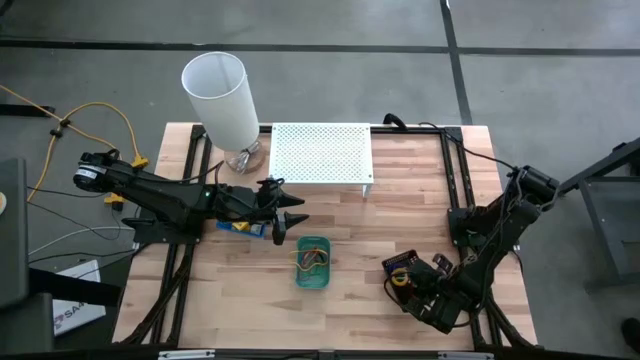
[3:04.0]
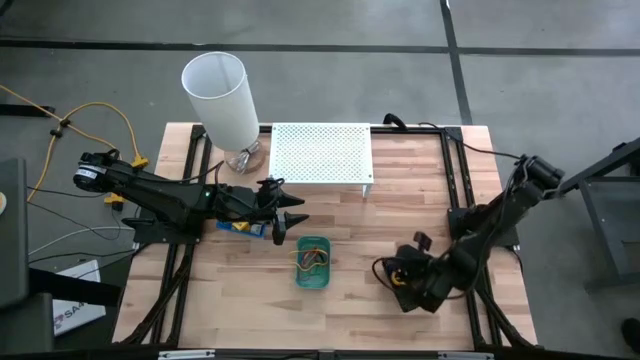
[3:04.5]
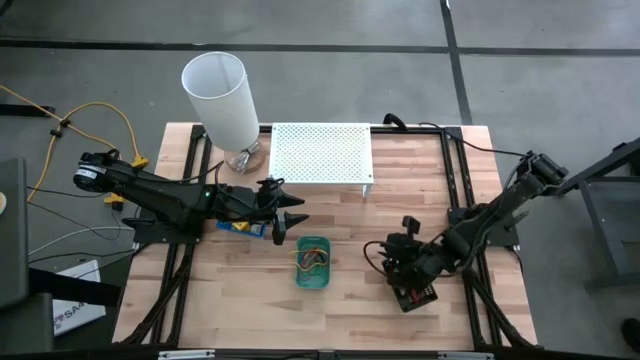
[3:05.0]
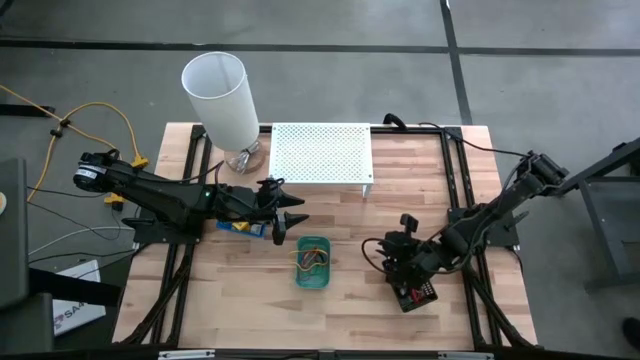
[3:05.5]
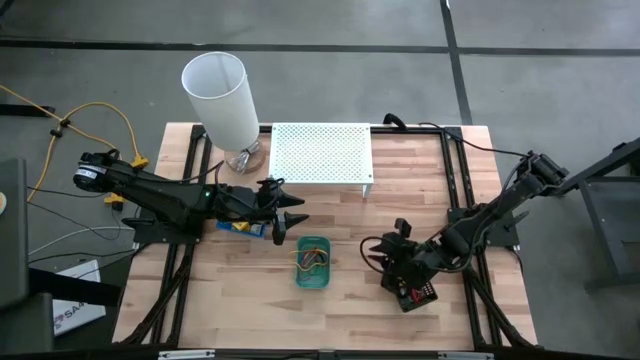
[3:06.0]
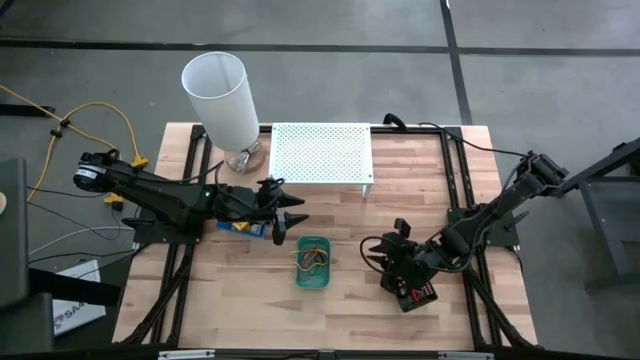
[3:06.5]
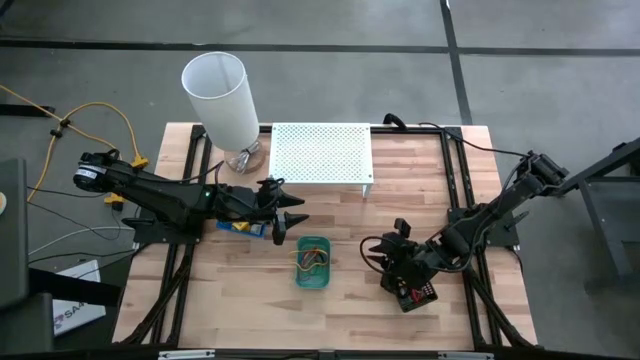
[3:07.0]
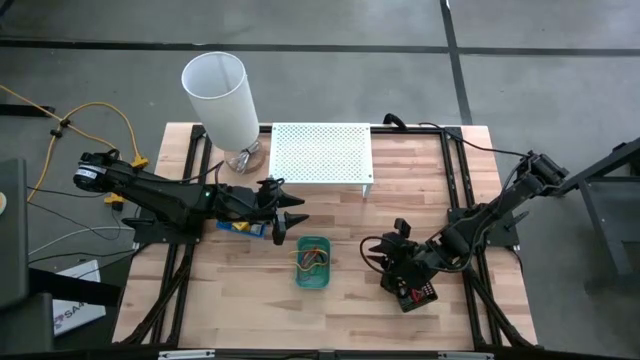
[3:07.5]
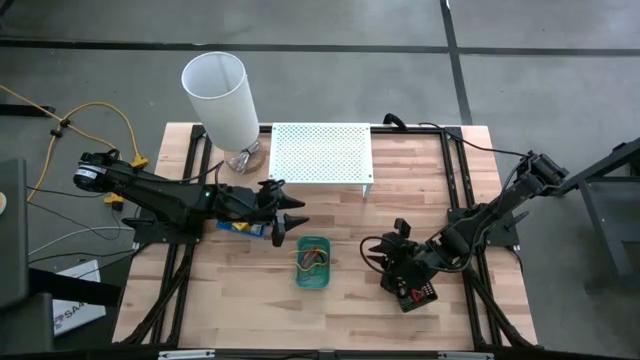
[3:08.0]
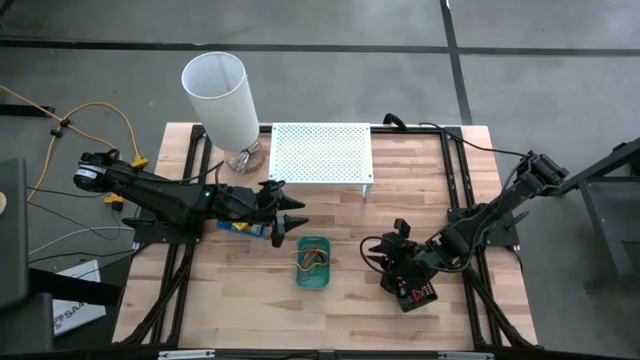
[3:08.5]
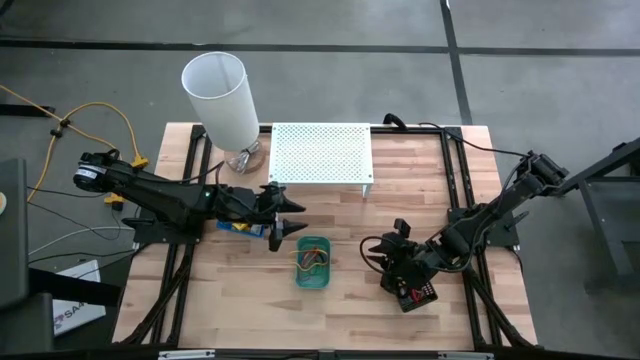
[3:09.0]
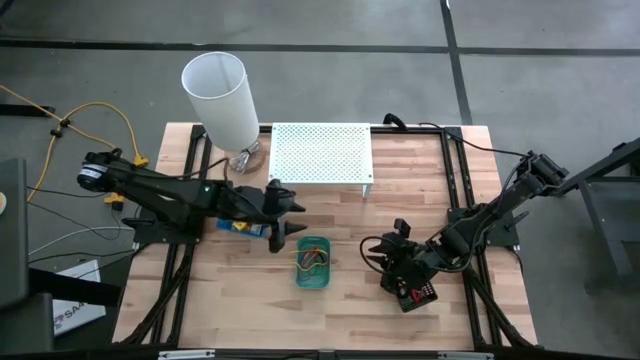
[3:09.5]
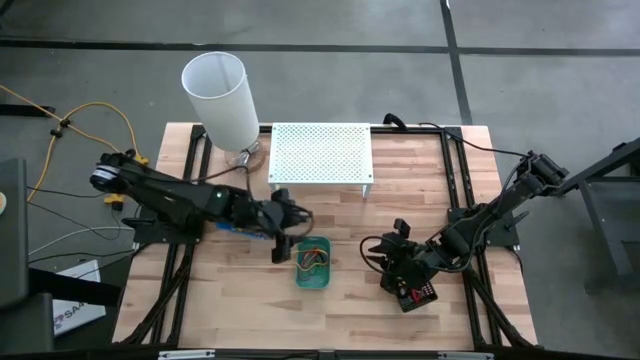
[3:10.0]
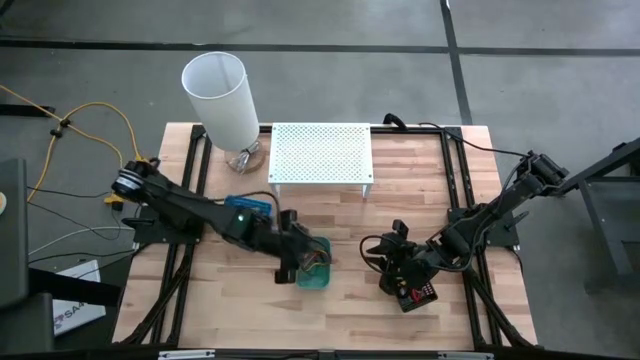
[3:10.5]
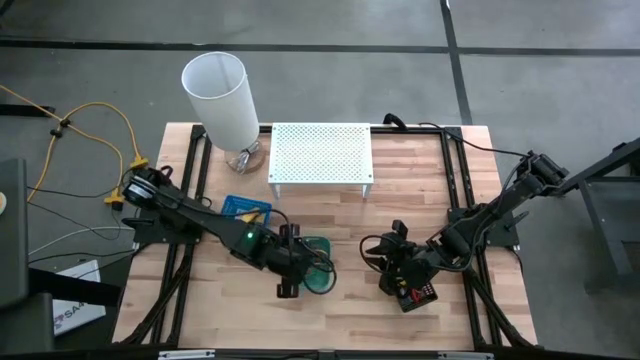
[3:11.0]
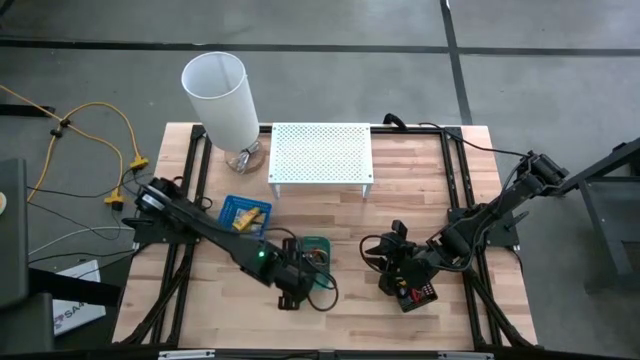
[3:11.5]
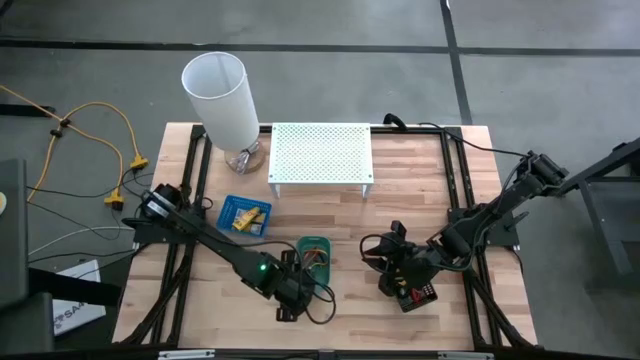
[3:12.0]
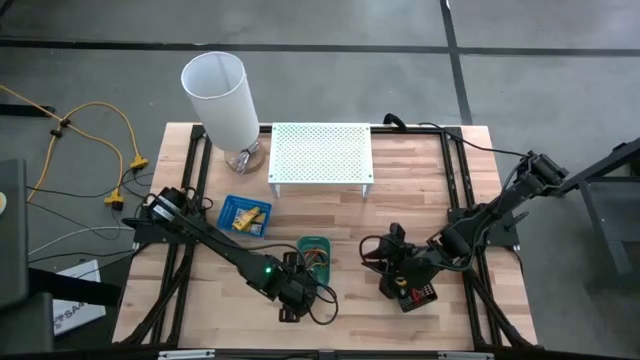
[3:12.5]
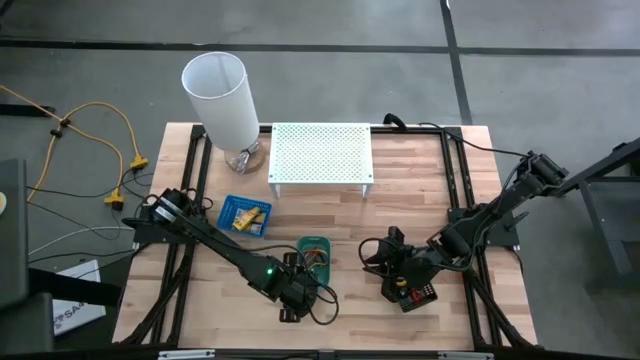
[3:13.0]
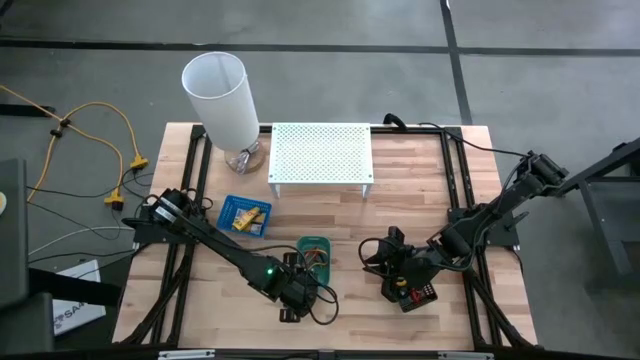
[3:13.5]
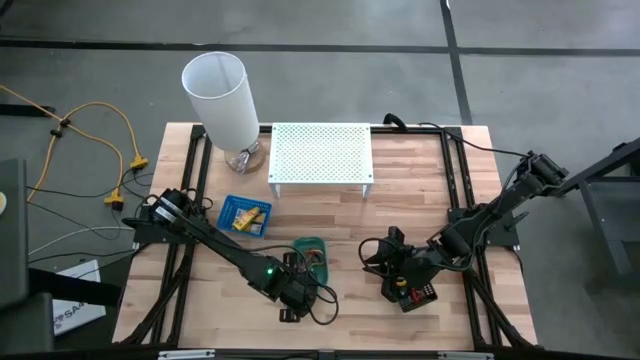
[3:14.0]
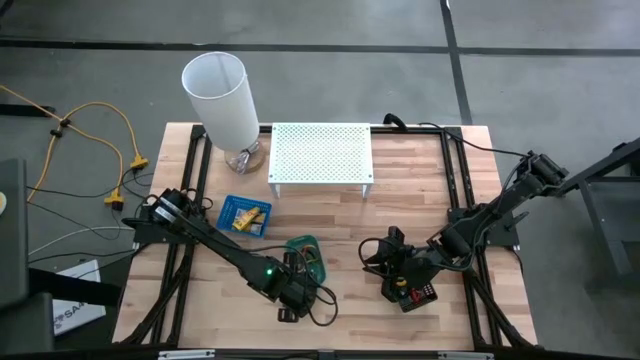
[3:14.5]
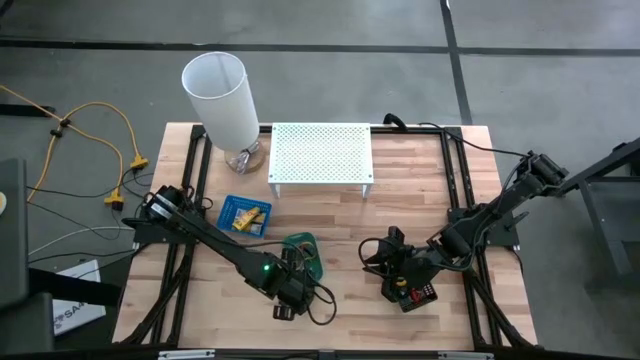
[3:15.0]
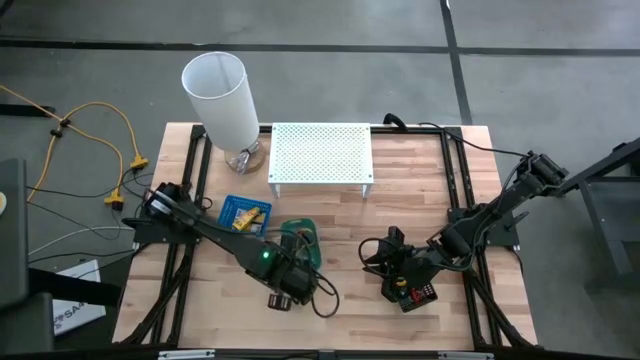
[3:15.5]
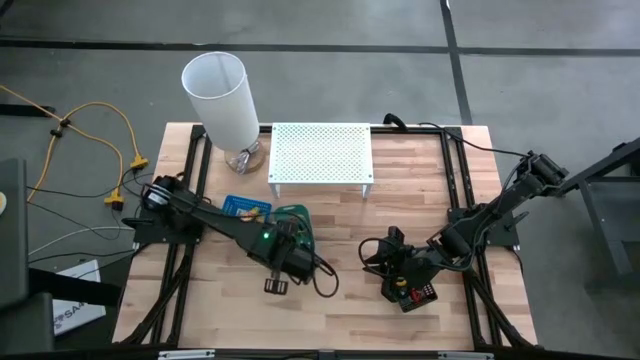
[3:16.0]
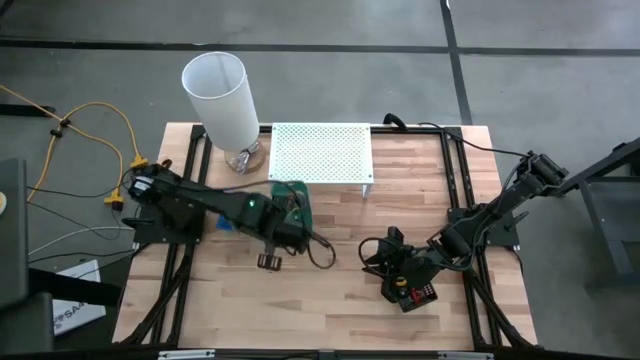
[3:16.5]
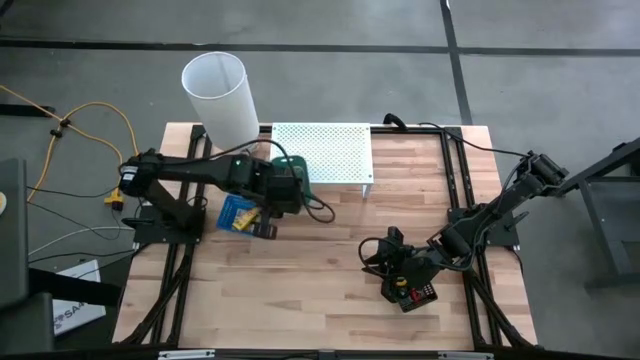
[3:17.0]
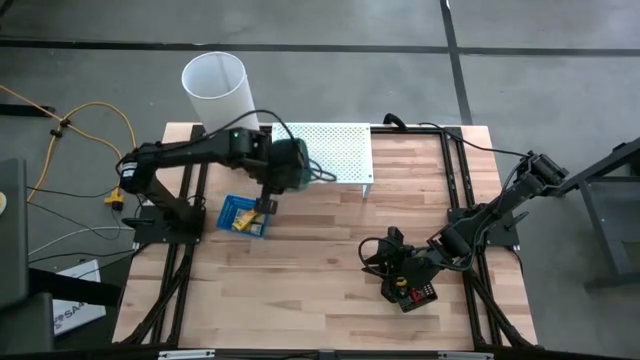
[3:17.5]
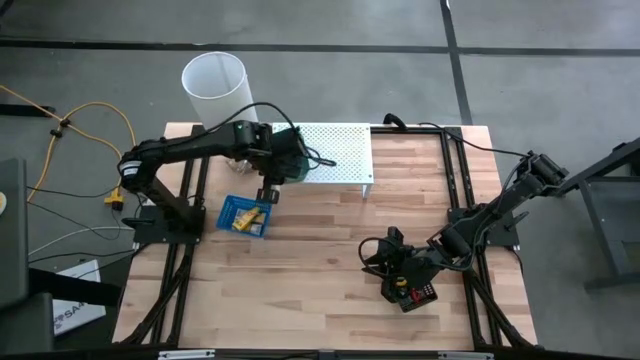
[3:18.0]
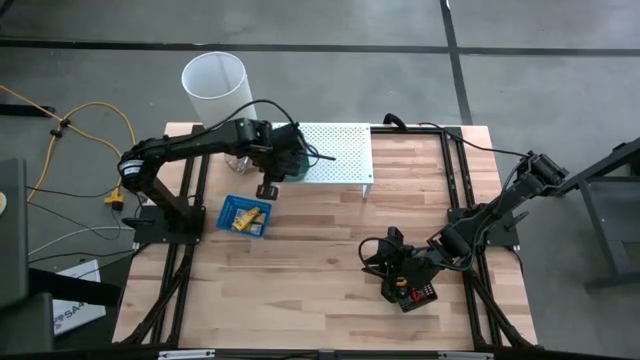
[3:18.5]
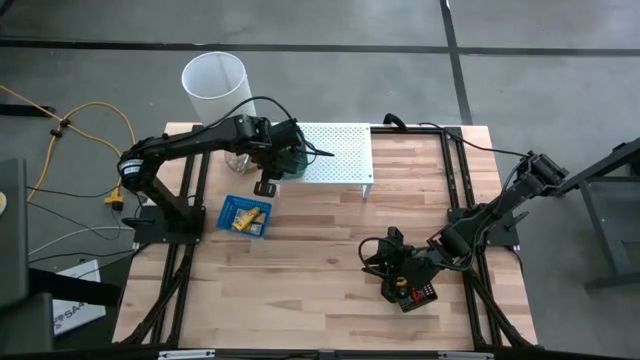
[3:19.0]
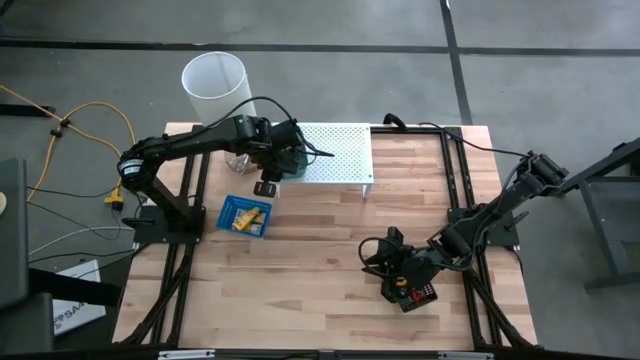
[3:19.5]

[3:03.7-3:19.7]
Task: Pick & Place Office Desk Supplies
Put the green bin with rubber bands on the shelf

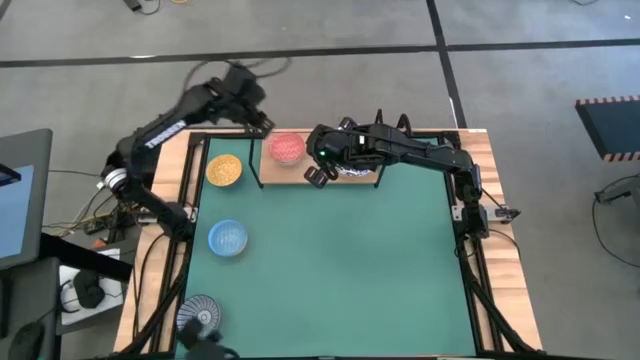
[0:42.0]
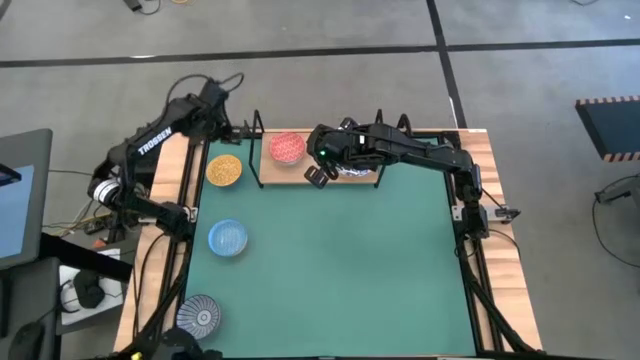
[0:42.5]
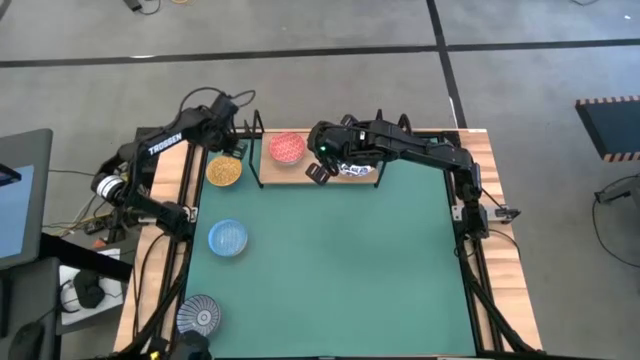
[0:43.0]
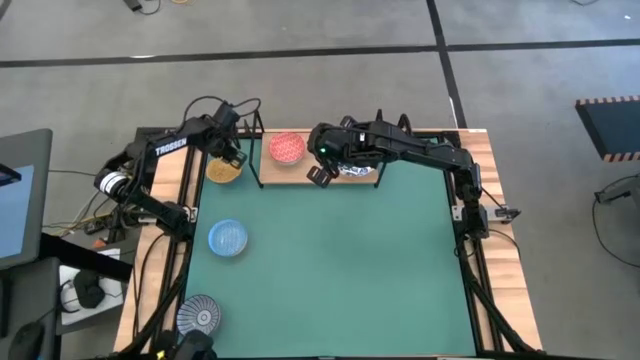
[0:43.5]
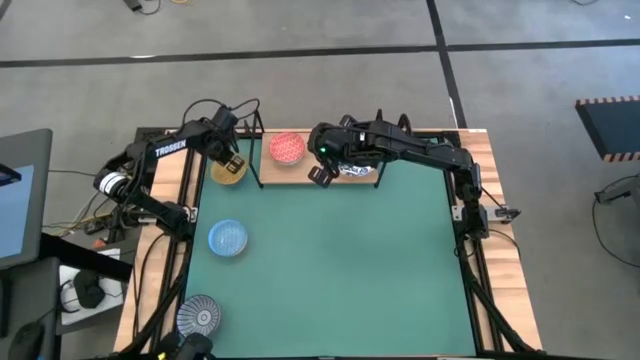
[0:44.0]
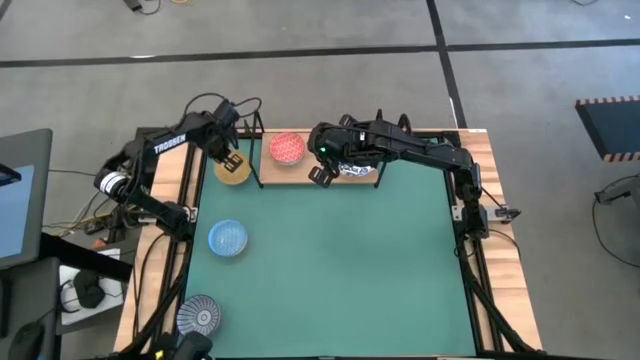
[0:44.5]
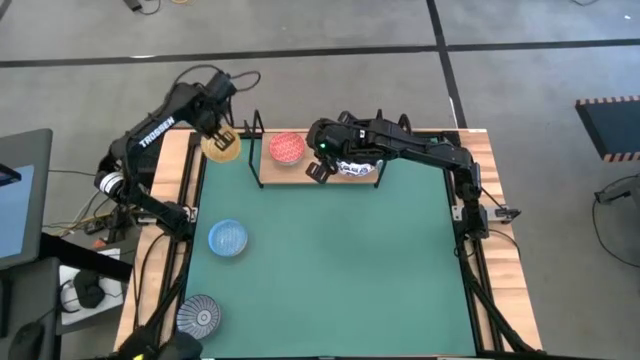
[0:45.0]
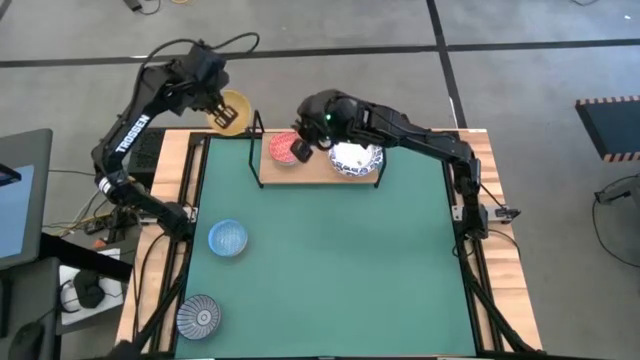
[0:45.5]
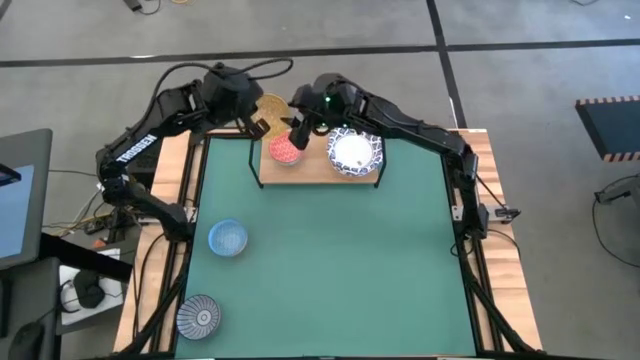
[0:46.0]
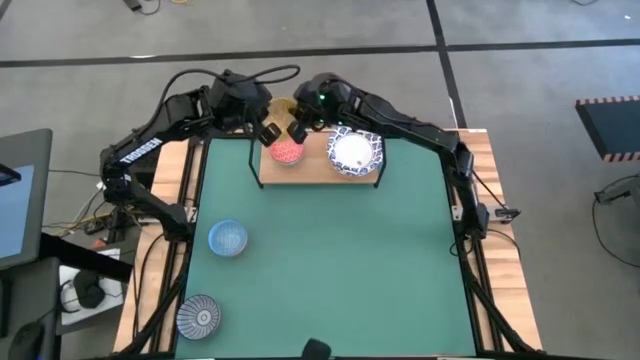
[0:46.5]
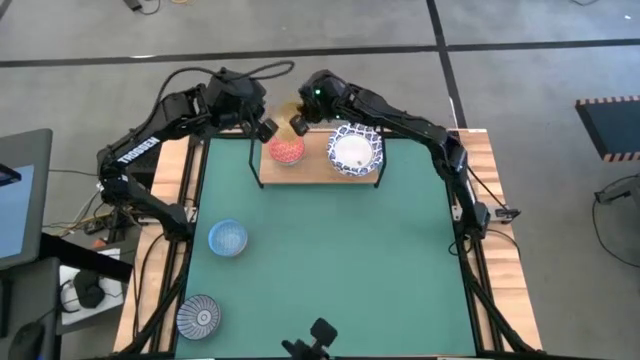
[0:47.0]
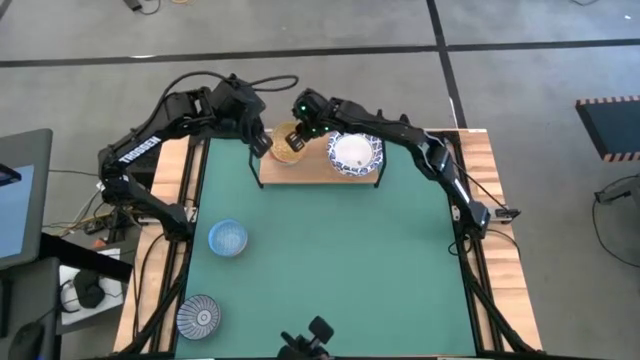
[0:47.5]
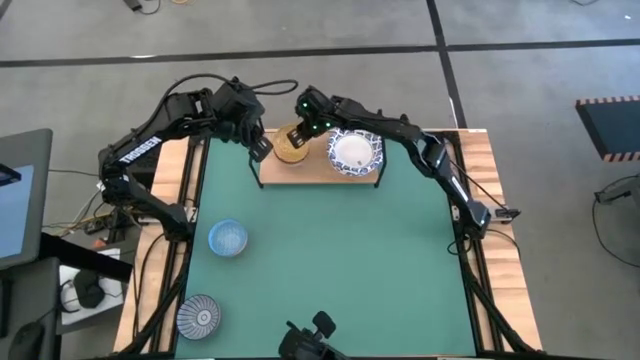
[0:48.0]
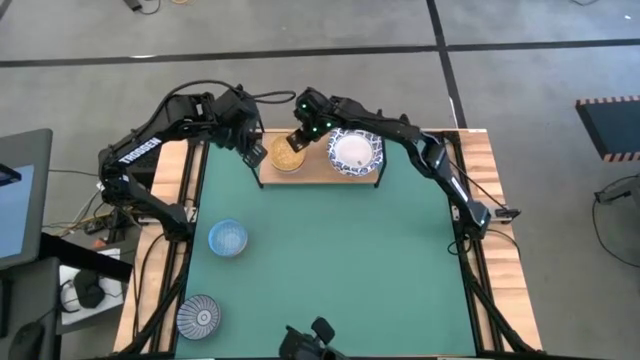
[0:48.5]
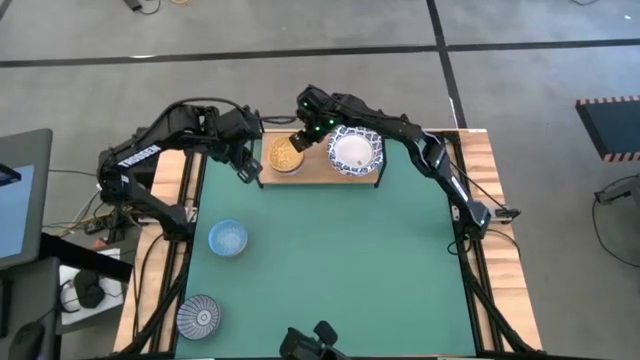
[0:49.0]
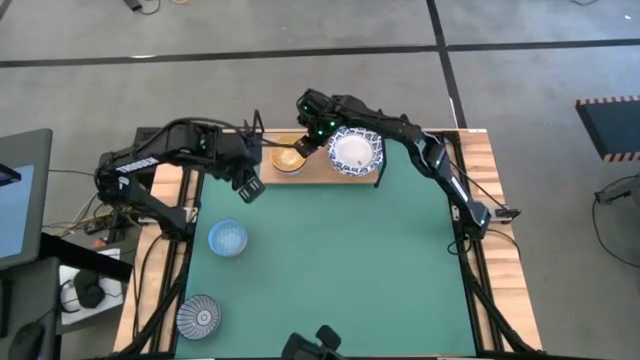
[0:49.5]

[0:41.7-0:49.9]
Task: Place and stack bowls onto a shelf
Stack the yellow bowl on top of the red bowl on the shelf
